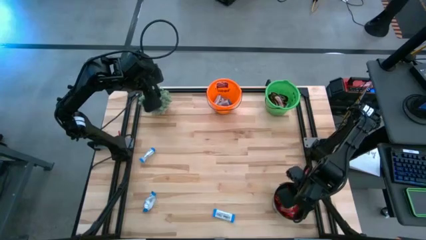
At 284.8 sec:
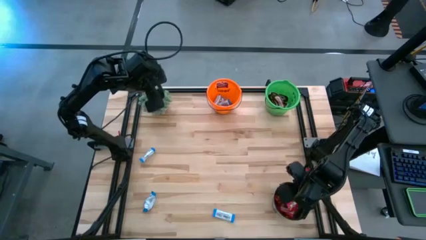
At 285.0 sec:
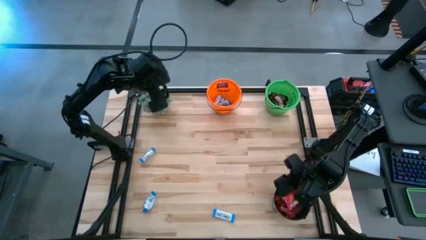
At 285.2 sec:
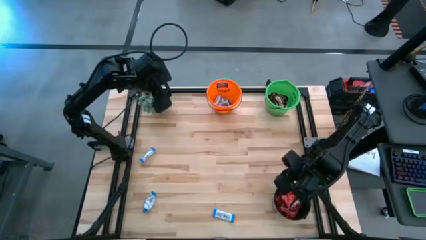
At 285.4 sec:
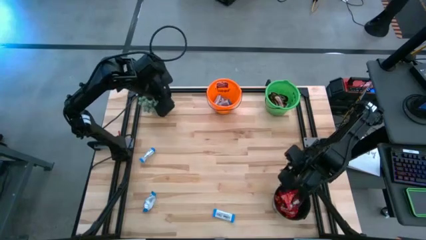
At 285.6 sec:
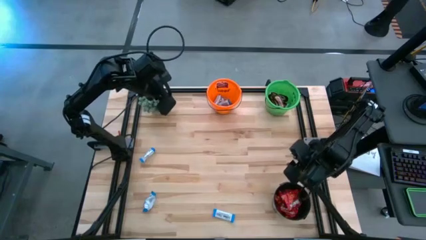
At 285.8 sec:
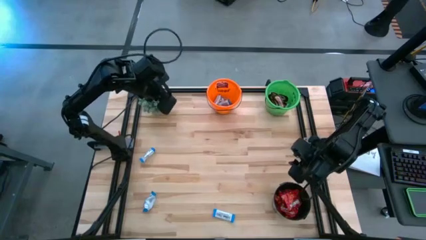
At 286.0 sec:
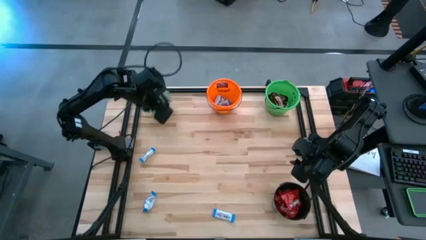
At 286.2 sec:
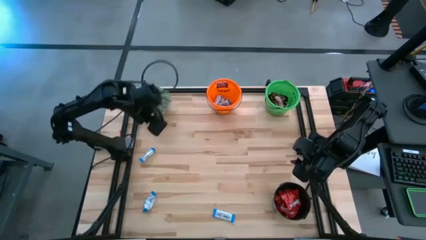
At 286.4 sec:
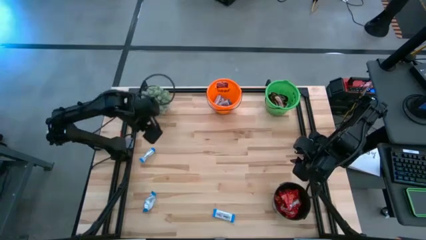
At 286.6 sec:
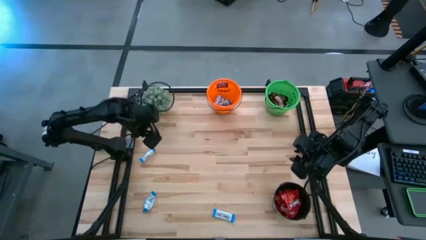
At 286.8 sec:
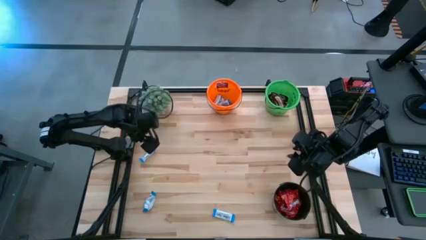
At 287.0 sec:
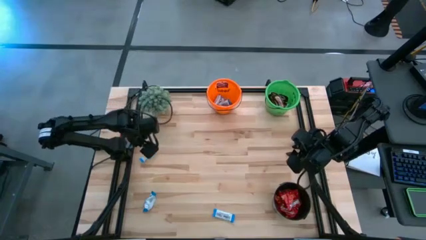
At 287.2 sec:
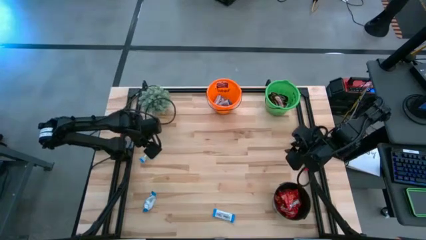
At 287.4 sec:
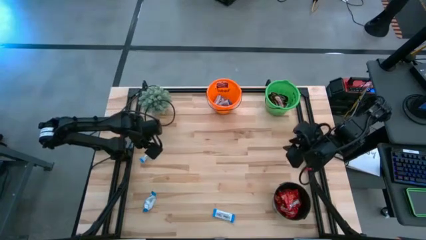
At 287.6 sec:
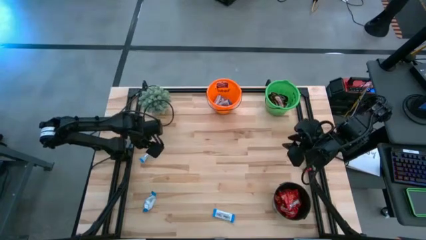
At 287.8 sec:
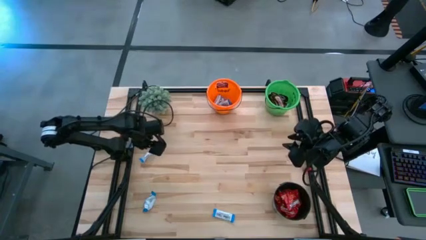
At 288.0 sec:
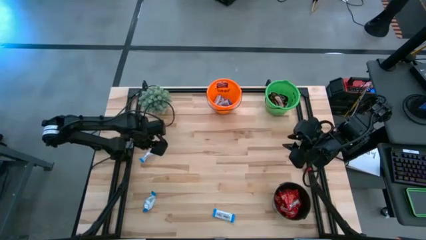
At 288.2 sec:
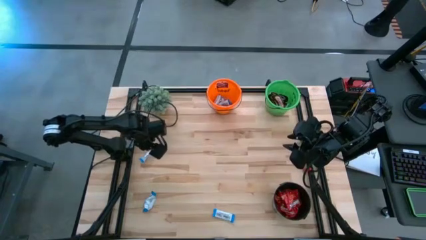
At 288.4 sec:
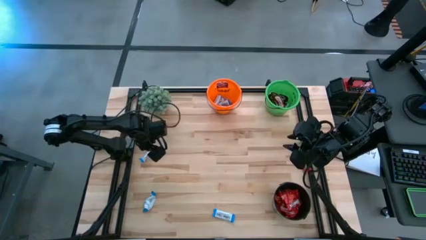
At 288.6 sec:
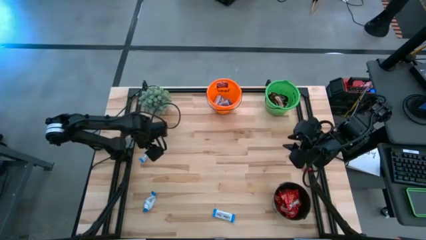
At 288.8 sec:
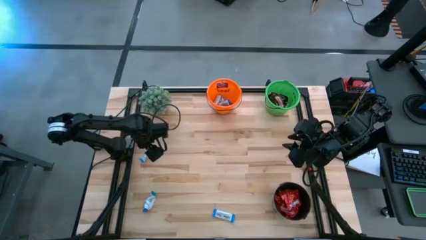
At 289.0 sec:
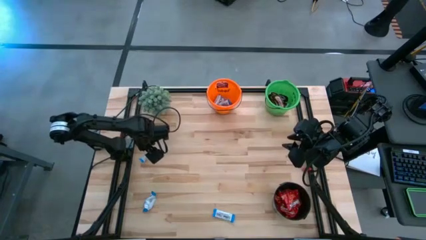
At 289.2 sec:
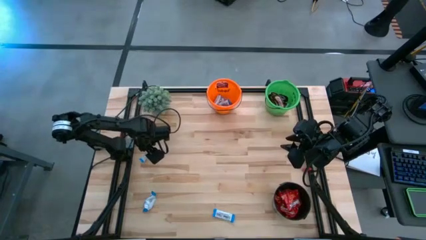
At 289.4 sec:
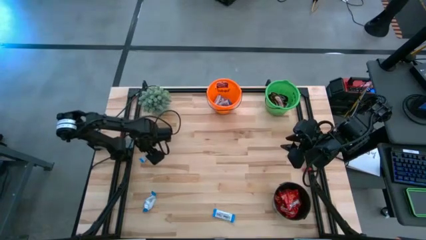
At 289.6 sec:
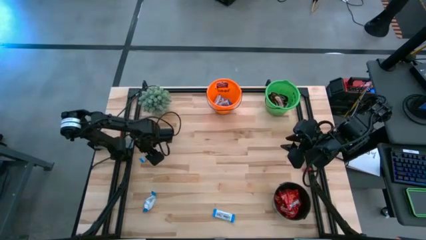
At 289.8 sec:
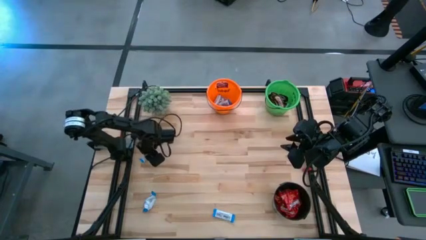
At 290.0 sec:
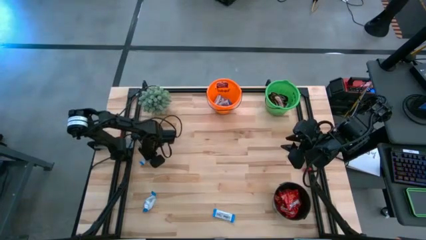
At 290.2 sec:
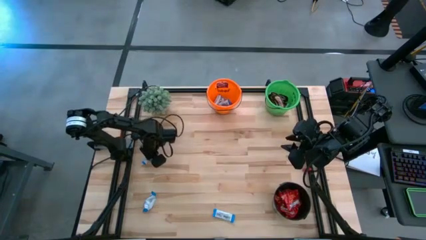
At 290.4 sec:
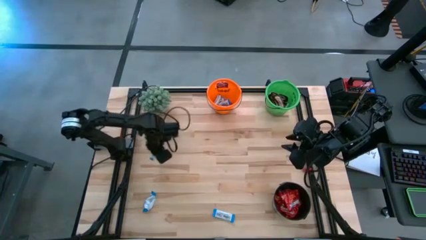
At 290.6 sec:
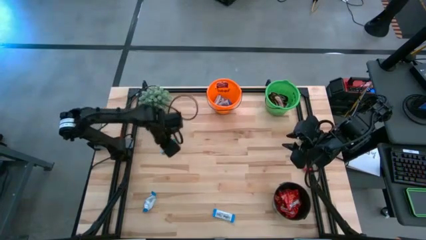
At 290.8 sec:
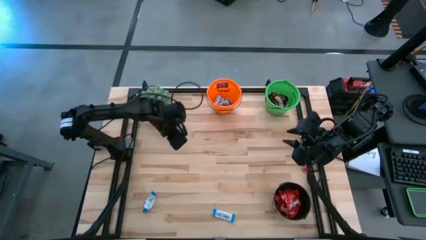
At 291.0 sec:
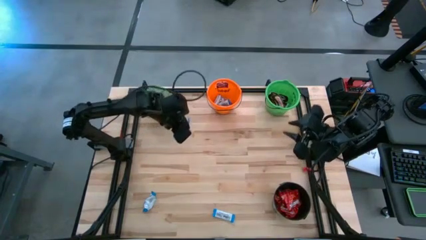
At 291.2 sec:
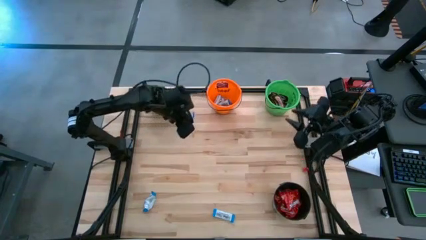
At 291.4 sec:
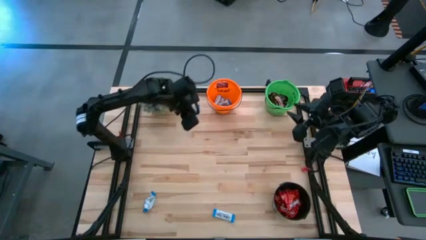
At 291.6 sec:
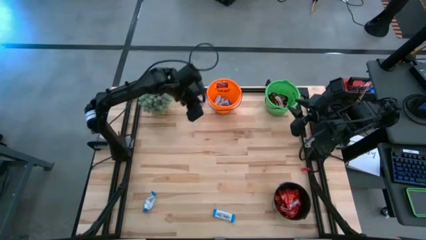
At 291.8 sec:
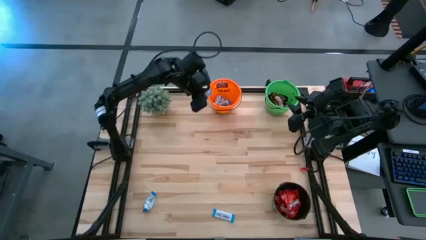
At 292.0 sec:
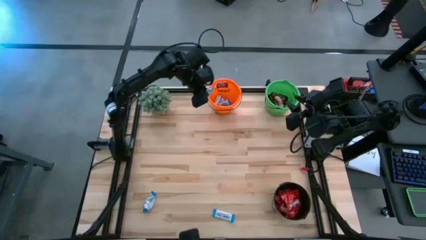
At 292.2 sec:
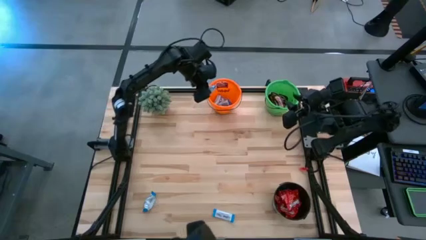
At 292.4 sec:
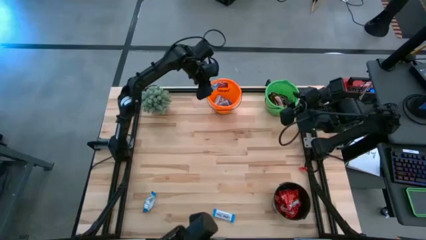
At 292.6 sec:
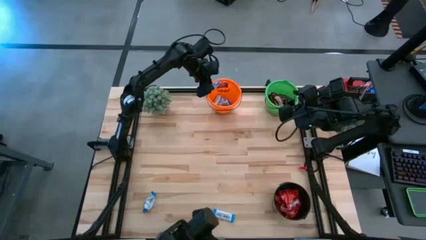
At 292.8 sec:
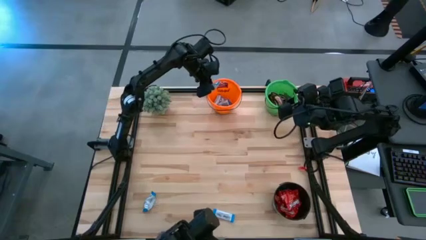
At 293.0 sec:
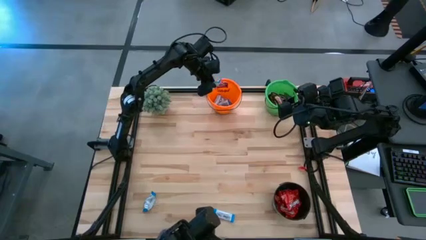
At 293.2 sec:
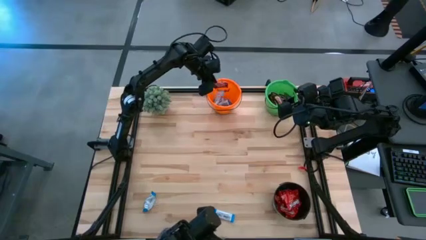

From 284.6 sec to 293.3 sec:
Task: Organize candy in baskets
Put the white chocolate into the orange bucket

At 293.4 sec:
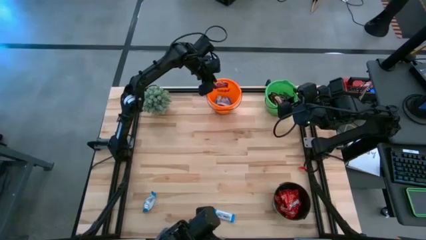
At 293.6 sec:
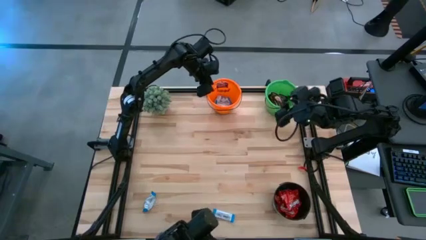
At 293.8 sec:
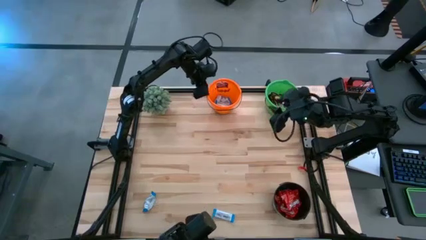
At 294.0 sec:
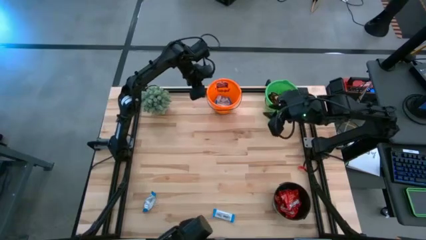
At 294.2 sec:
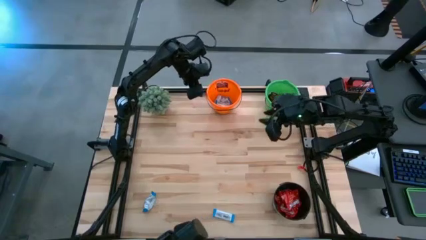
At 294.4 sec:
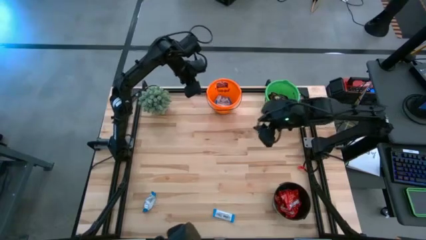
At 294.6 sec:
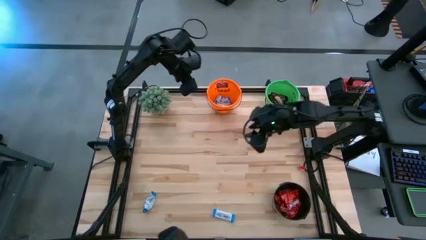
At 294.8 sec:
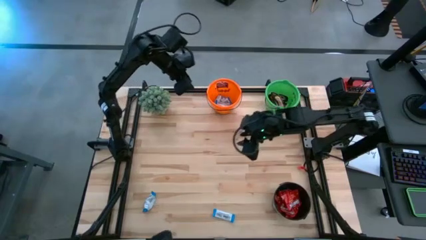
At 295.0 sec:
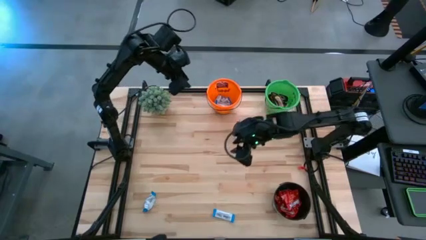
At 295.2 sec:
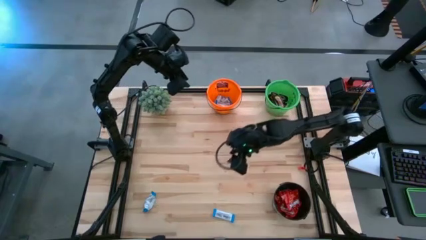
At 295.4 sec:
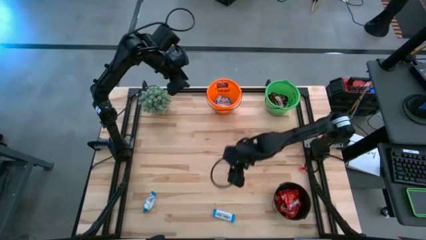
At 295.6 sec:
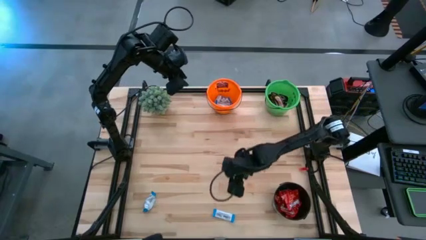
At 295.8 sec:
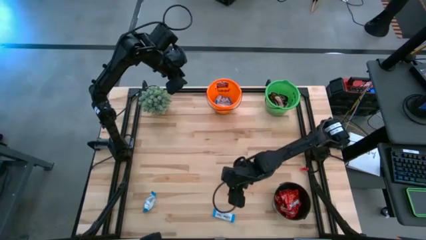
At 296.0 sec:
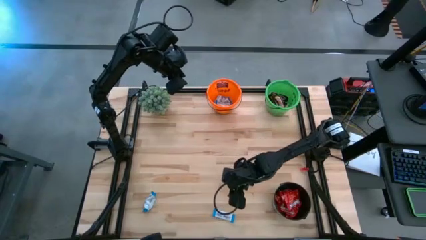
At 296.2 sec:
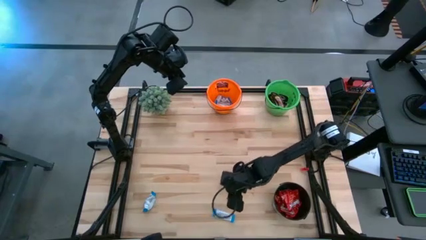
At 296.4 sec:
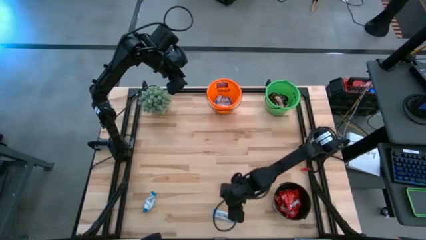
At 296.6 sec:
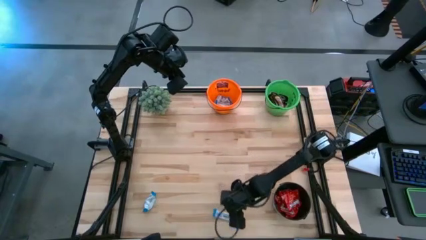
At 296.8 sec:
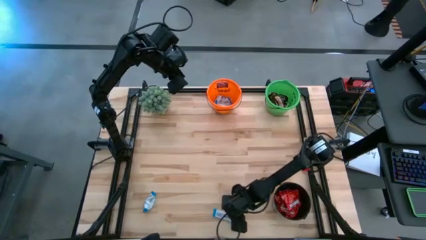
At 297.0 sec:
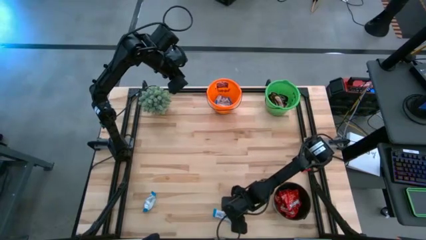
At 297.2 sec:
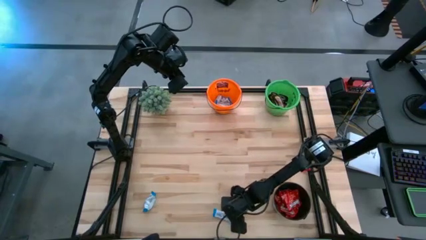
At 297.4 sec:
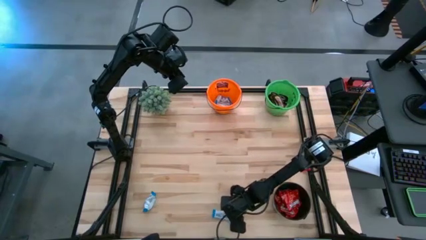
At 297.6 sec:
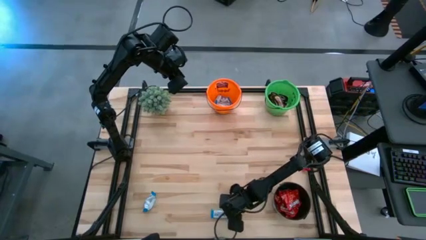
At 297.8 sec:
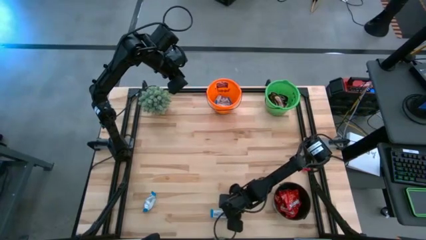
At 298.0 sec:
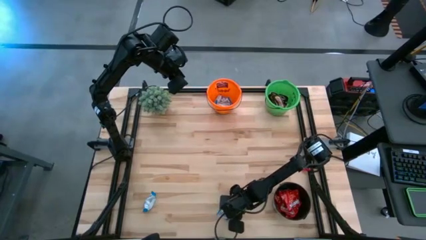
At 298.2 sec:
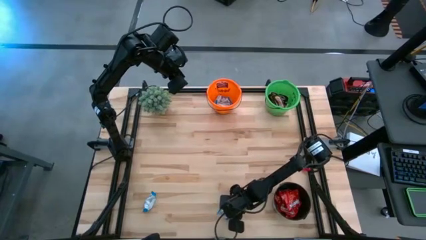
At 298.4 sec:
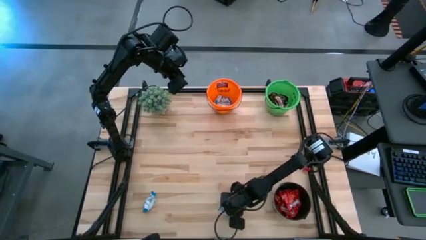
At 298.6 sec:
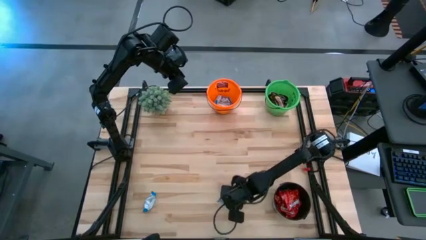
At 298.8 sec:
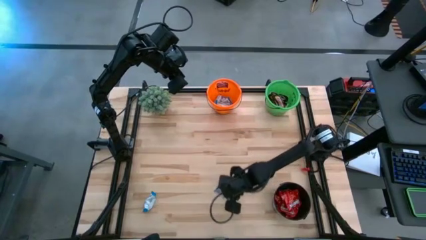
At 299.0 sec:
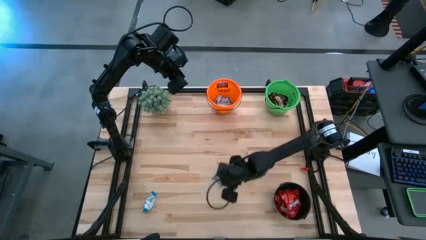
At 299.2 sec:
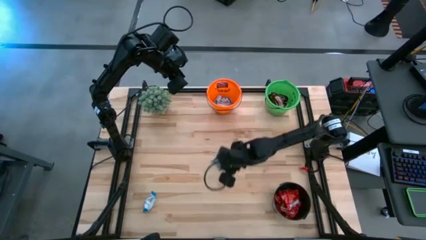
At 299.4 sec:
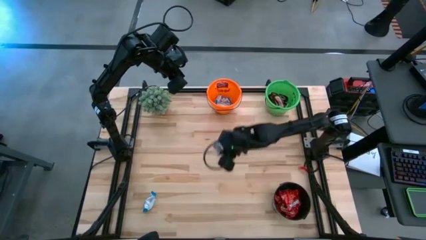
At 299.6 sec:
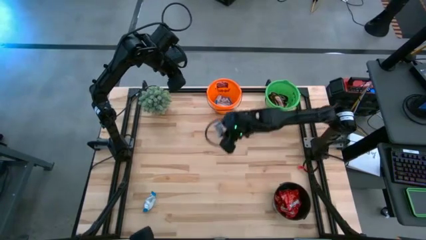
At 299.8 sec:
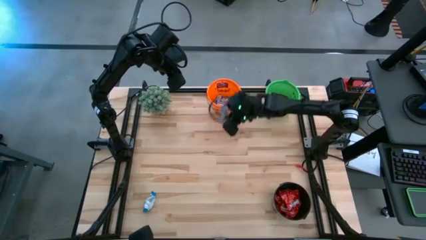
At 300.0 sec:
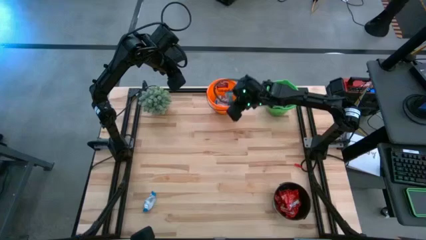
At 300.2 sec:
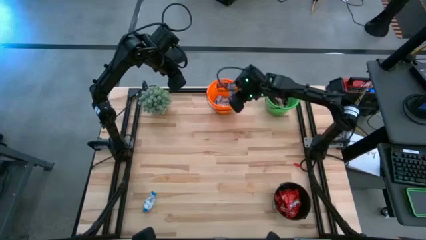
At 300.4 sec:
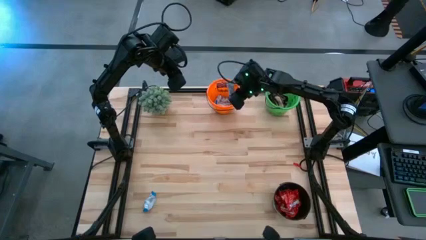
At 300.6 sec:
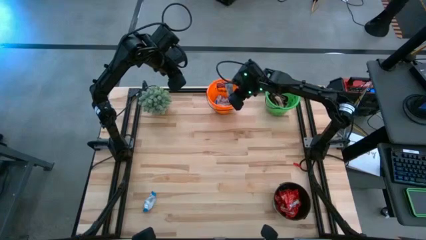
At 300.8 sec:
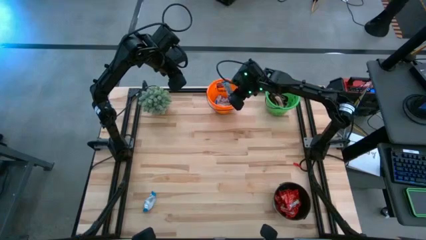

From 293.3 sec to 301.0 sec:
Put the white chocolate into the orange bucket
